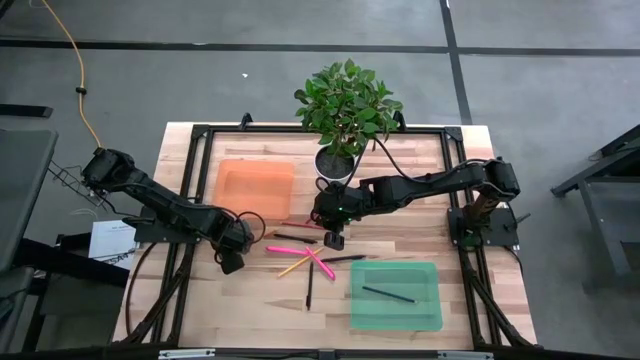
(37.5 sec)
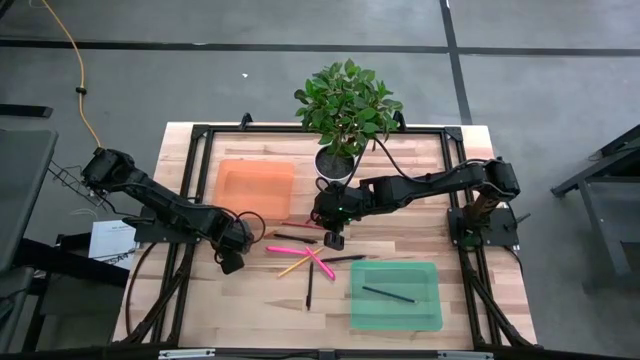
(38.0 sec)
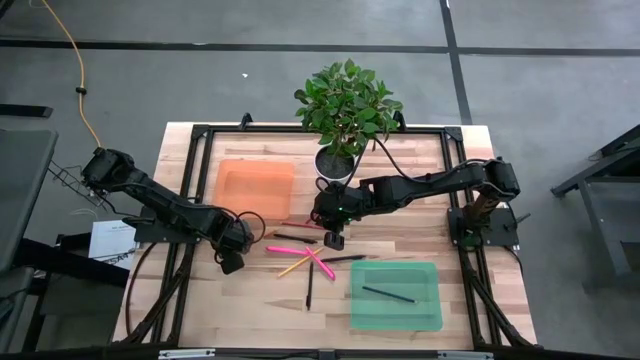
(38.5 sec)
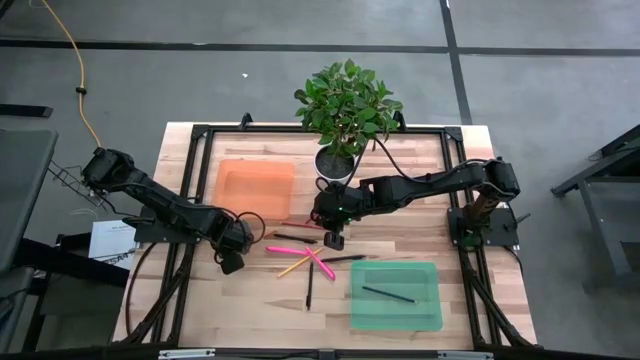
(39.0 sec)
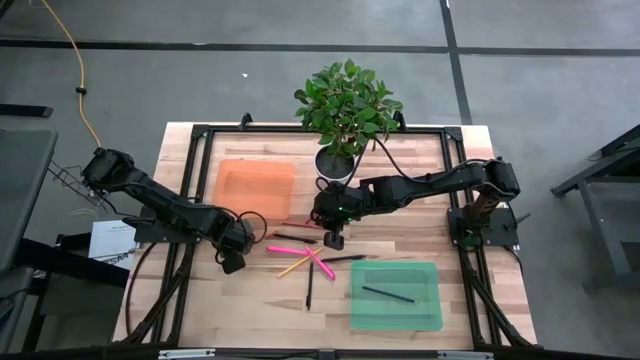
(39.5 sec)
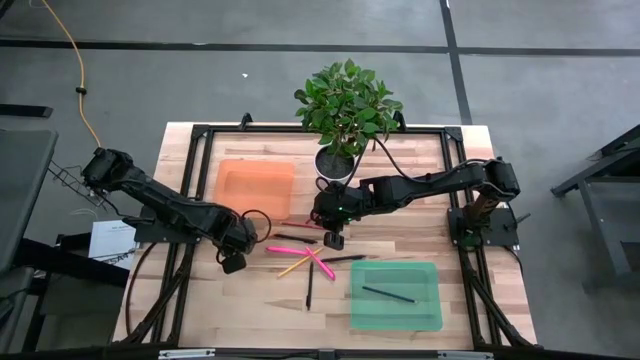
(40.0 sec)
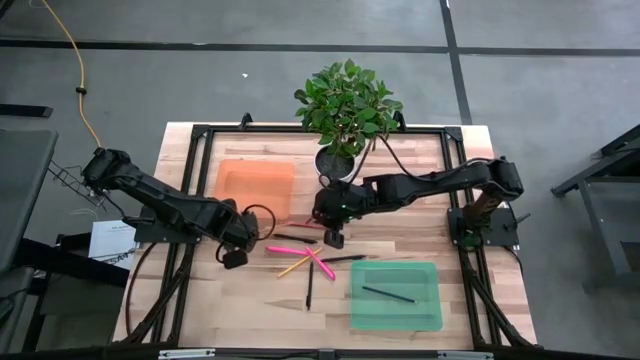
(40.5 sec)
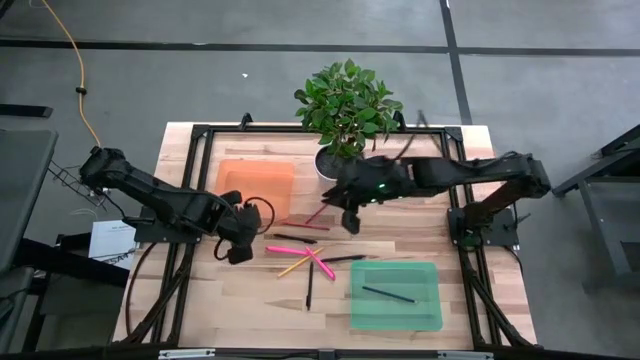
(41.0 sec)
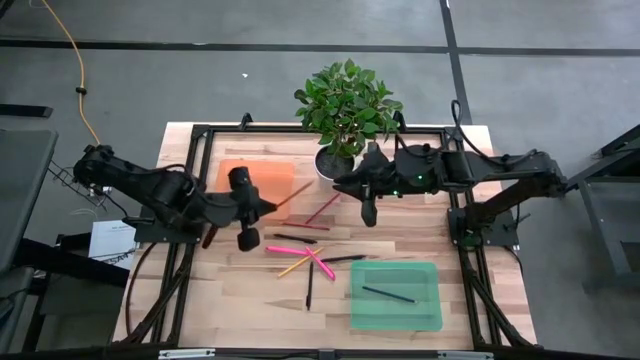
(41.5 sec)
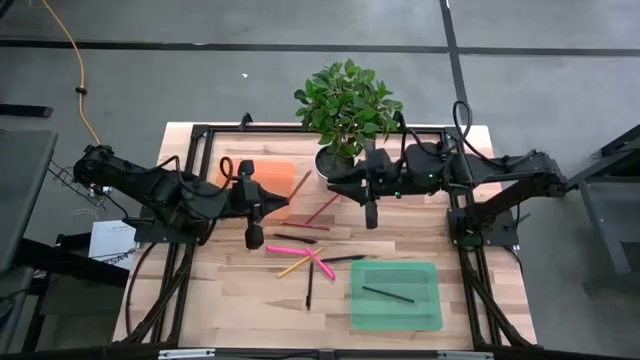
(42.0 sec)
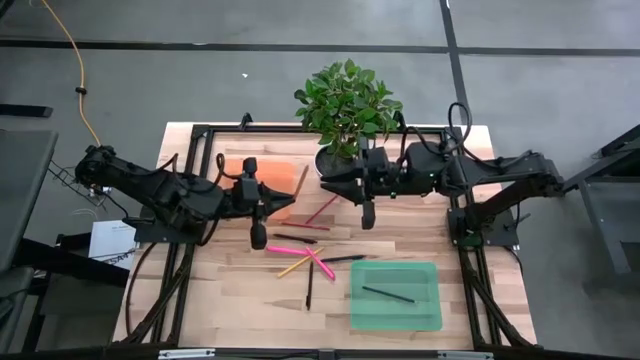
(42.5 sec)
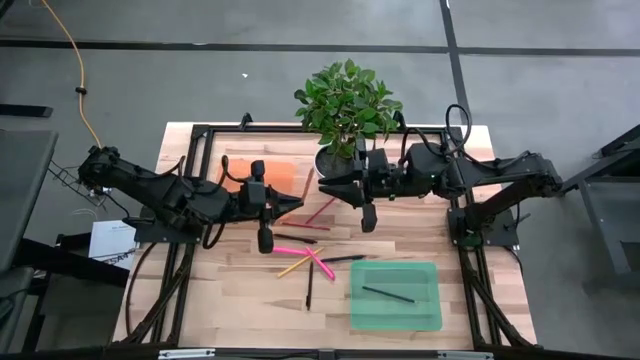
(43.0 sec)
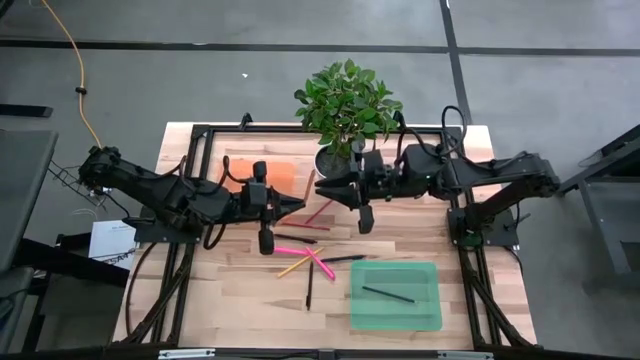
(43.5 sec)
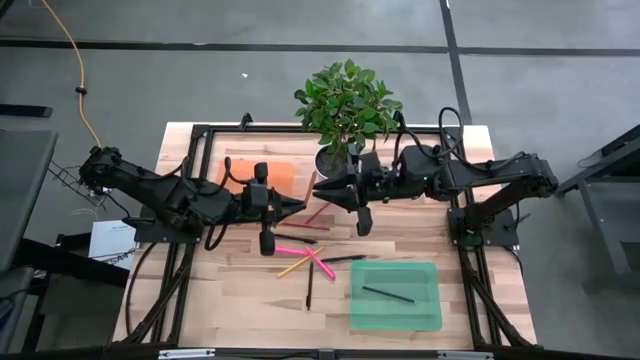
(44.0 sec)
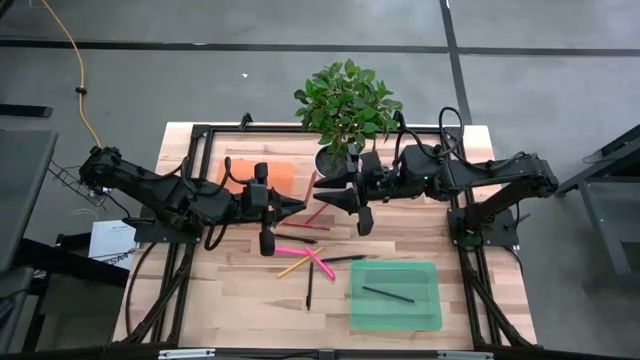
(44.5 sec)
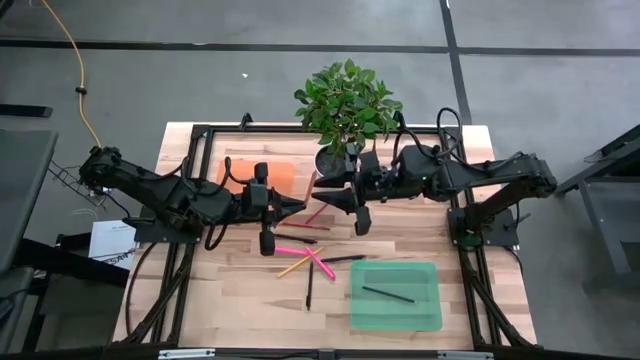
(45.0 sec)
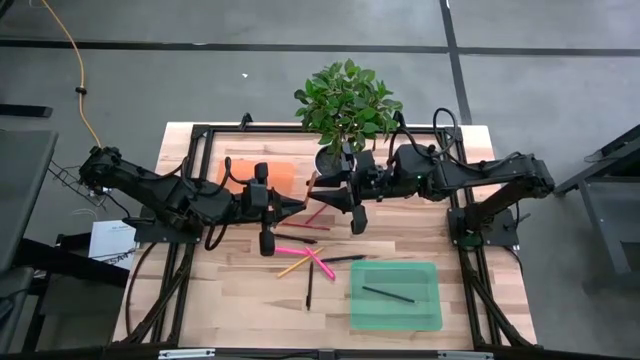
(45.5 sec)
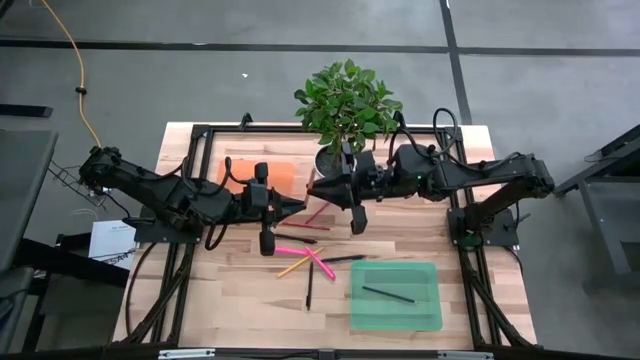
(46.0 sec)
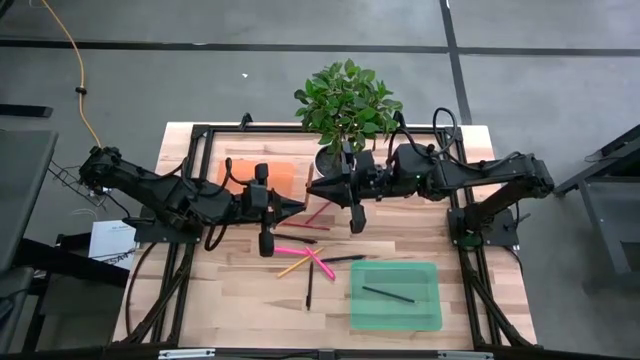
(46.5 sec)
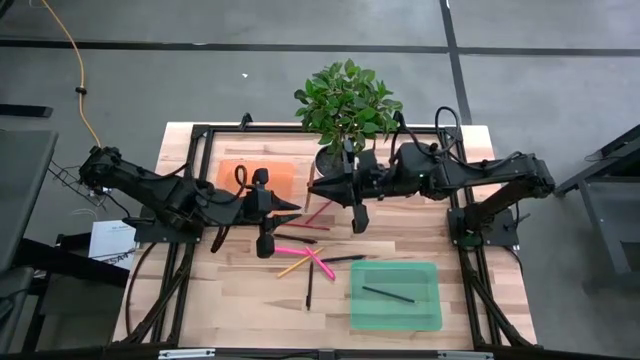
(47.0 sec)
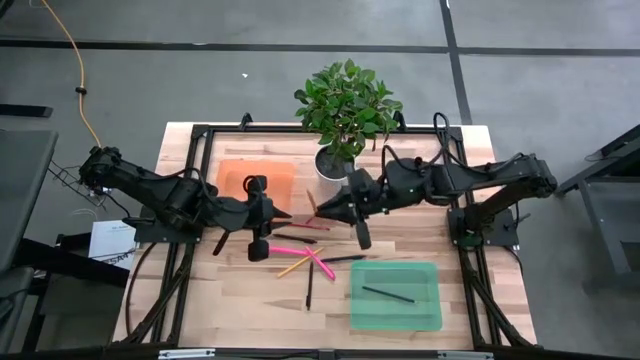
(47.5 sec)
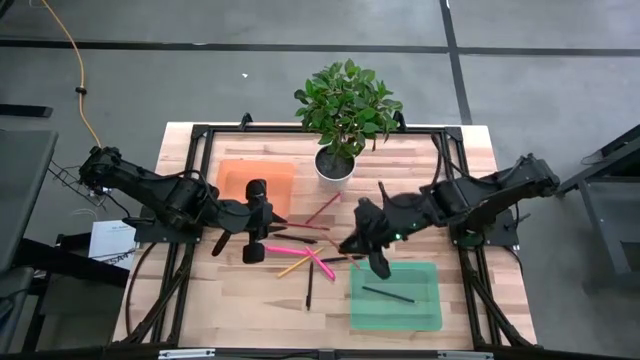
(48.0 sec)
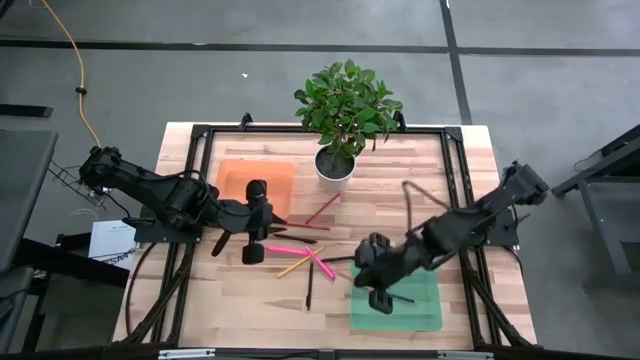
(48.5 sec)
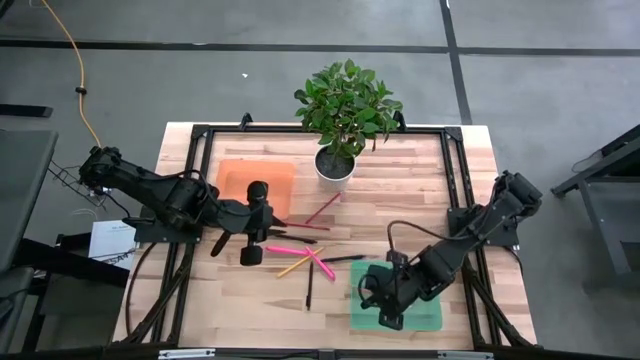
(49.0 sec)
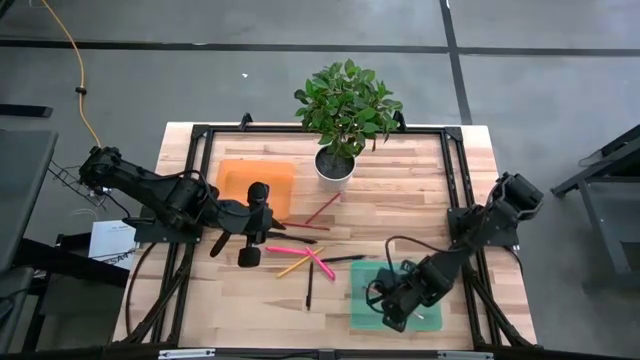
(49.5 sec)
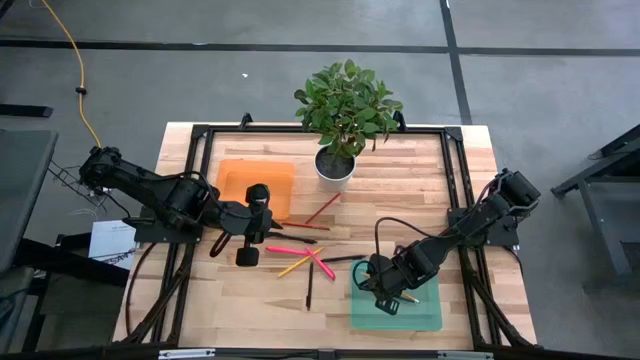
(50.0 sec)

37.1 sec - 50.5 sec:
Task: Sort pens & pencils
Put the orange pencil into the green bin

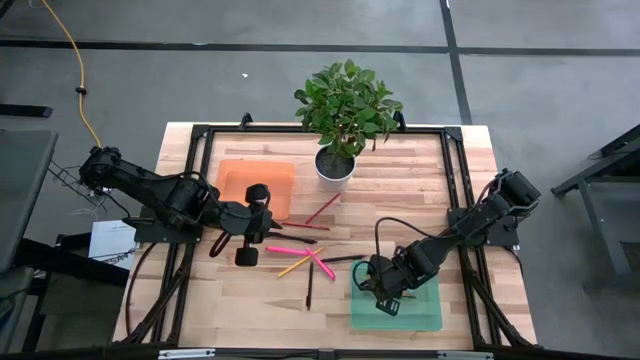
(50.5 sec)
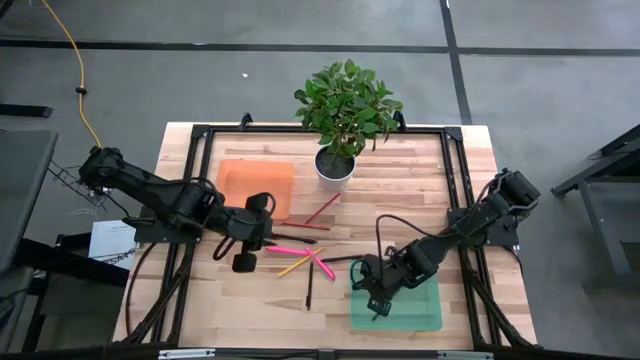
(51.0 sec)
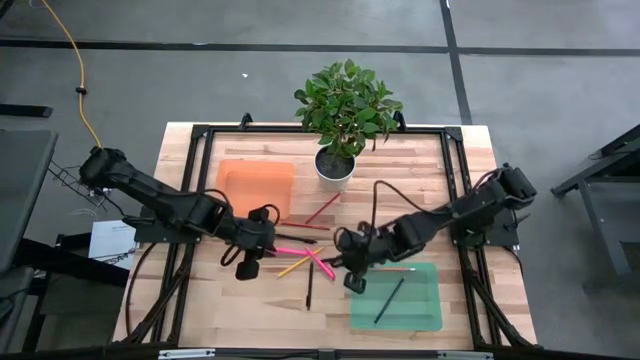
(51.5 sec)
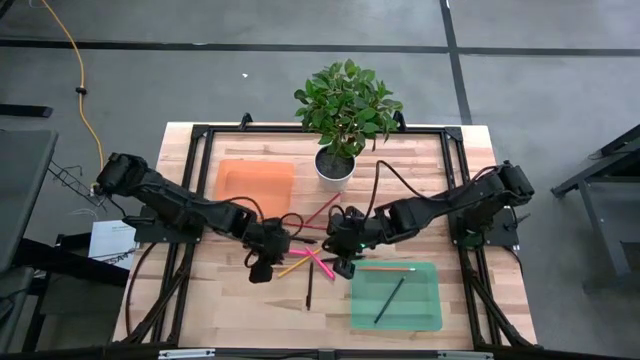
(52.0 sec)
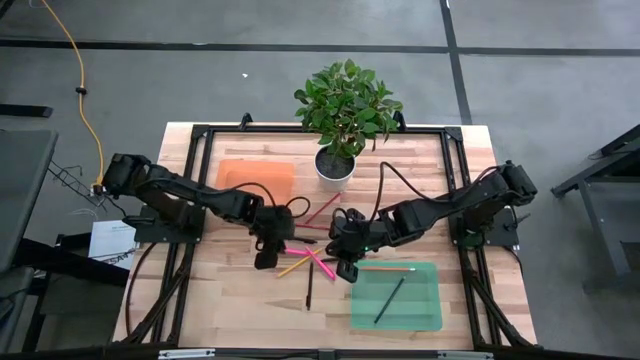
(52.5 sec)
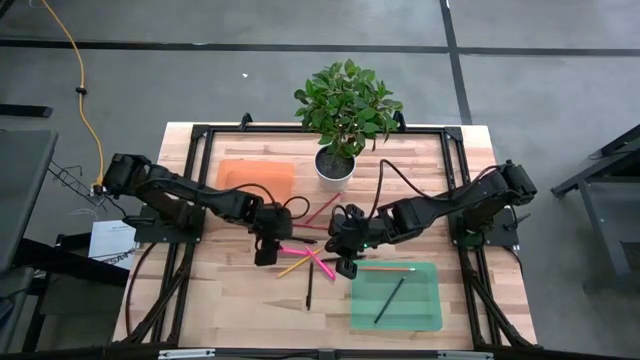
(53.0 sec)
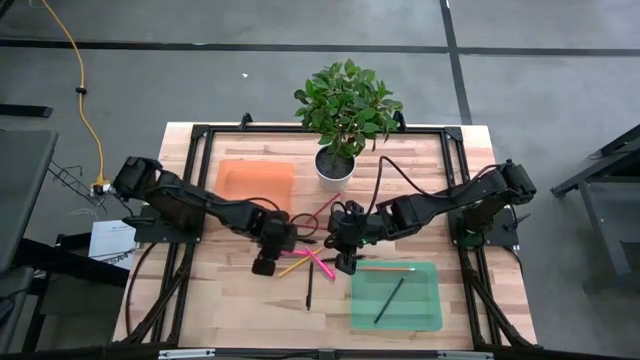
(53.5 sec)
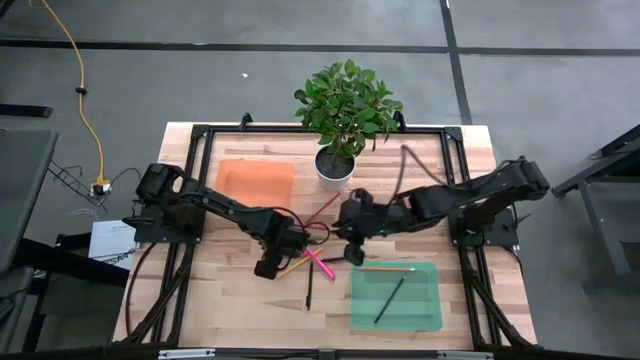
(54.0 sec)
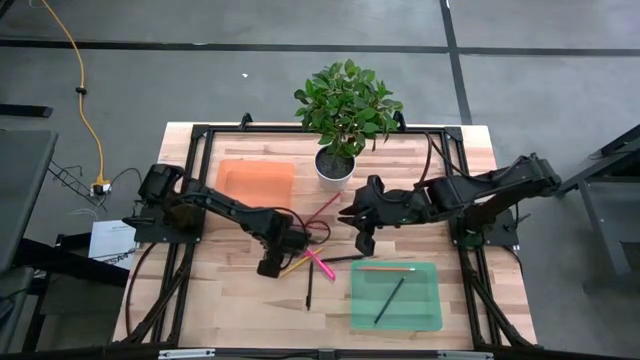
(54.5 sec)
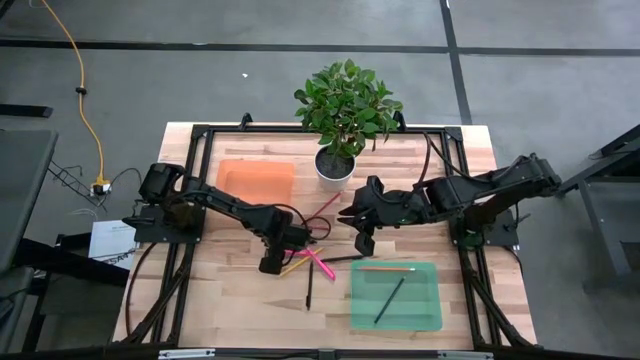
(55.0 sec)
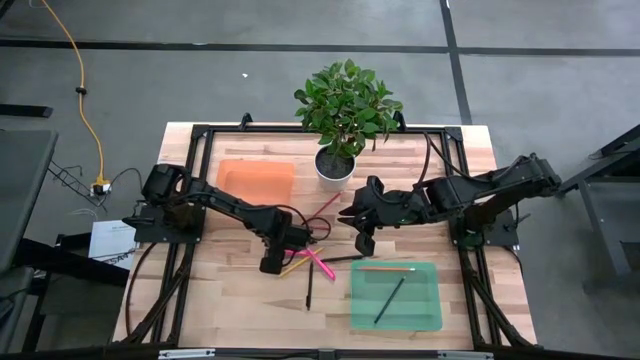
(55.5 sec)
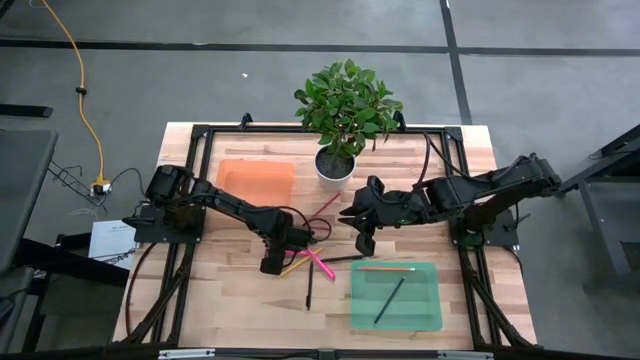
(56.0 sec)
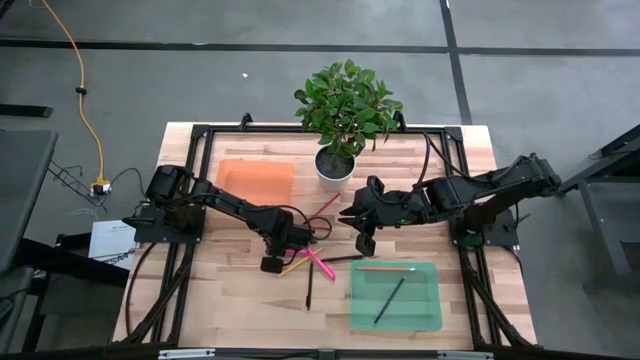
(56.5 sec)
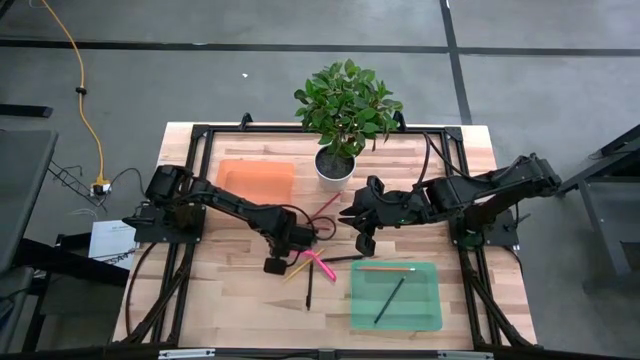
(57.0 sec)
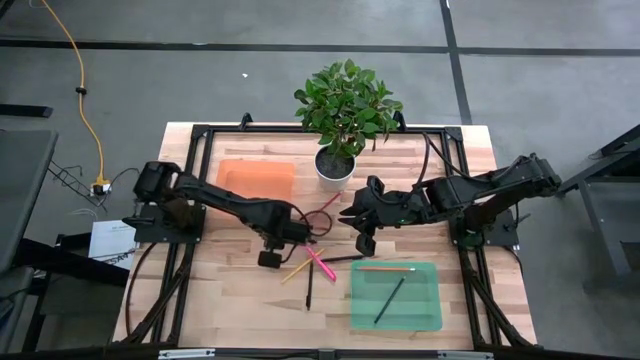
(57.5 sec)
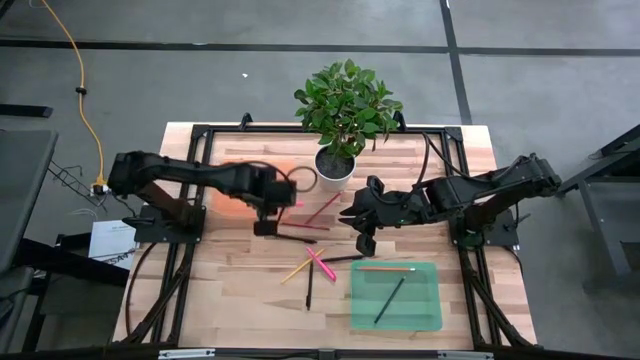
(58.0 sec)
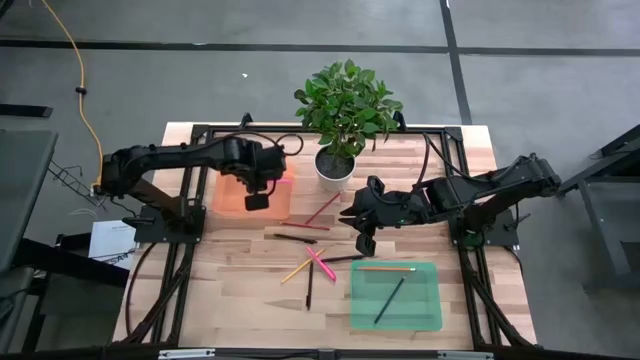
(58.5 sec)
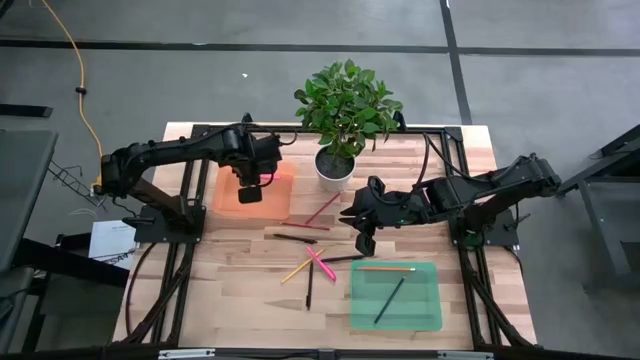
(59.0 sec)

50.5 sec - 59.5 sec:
Put the left pink pen into the orange bin
